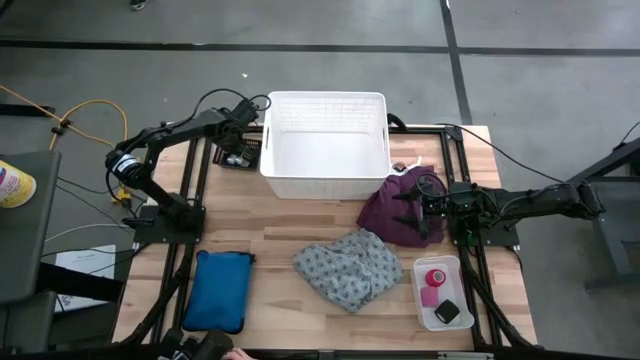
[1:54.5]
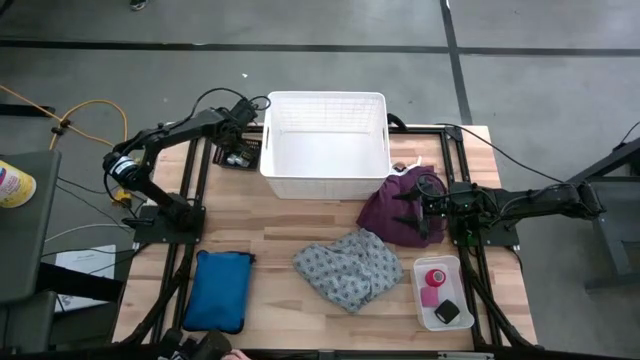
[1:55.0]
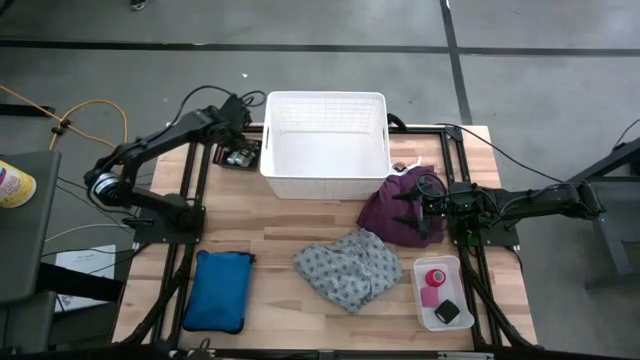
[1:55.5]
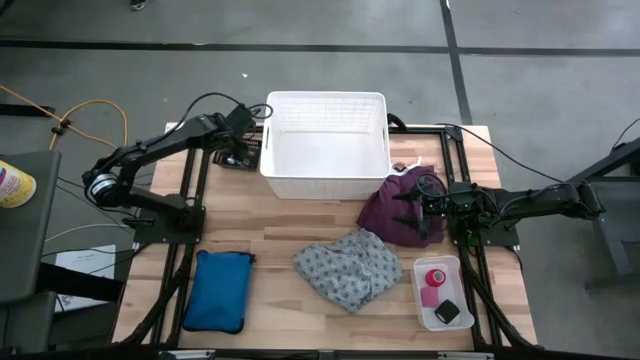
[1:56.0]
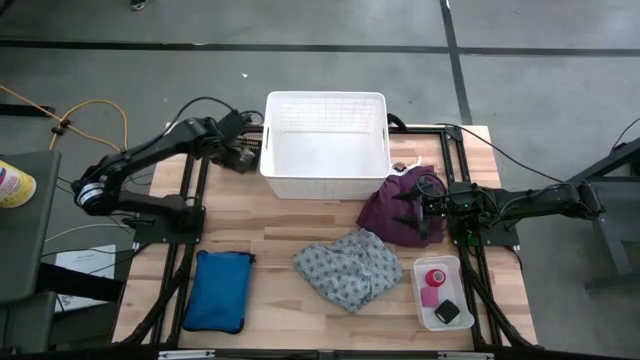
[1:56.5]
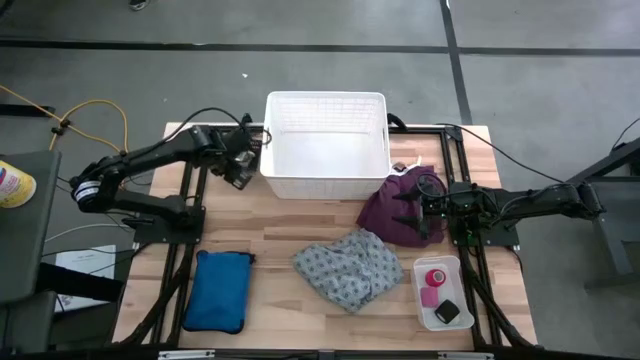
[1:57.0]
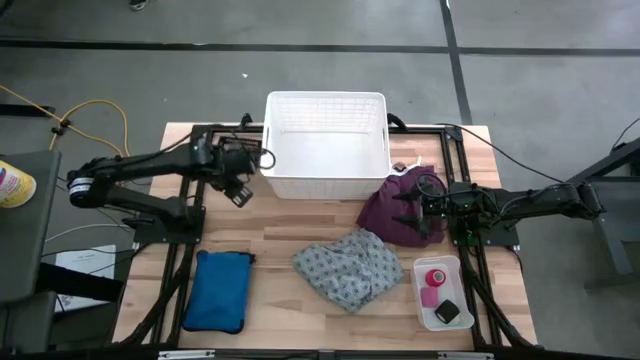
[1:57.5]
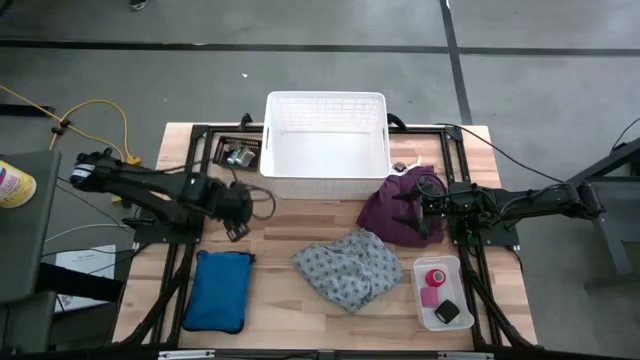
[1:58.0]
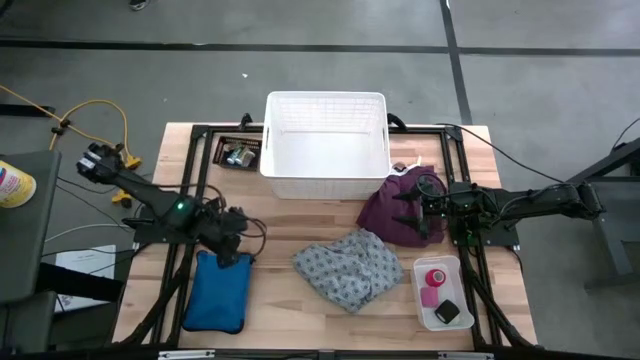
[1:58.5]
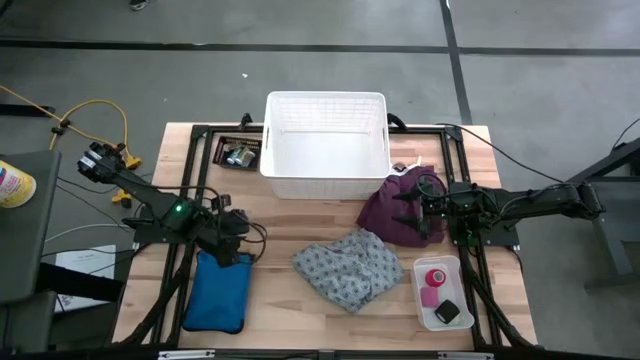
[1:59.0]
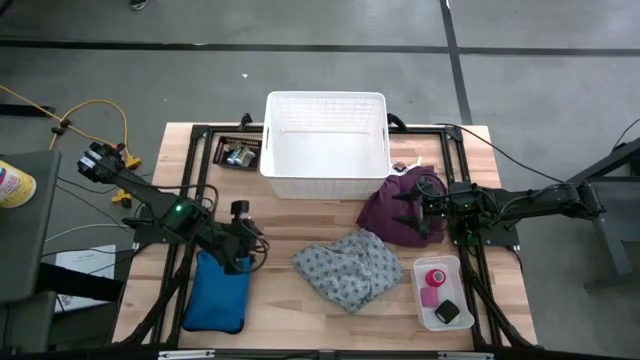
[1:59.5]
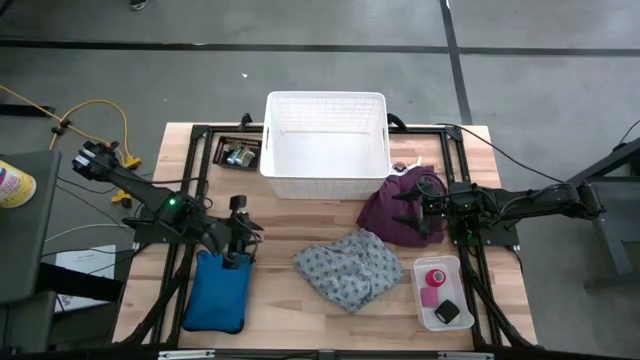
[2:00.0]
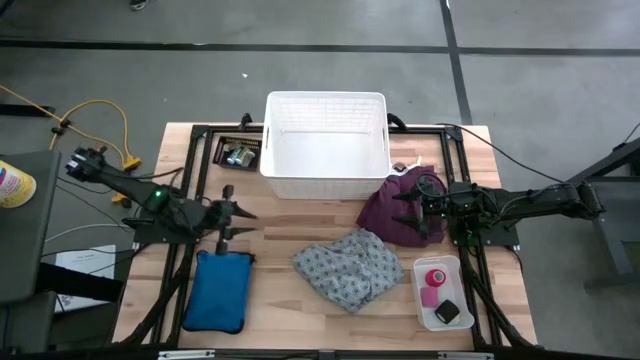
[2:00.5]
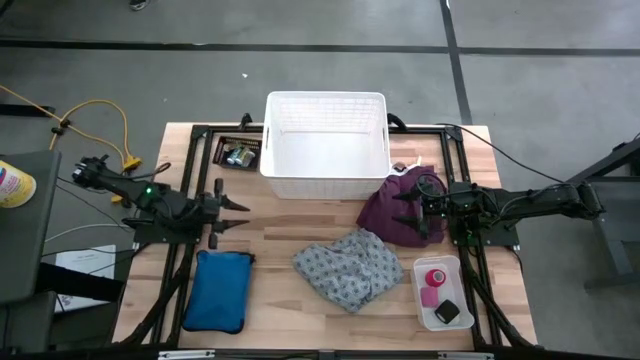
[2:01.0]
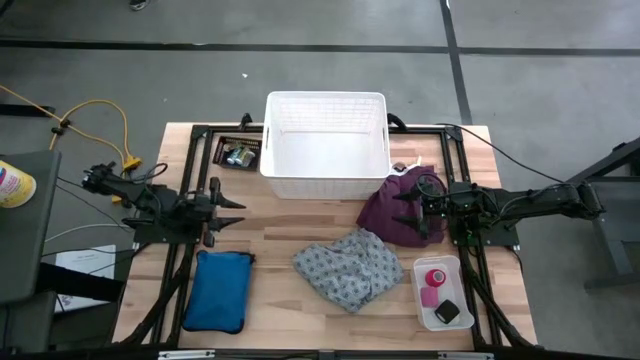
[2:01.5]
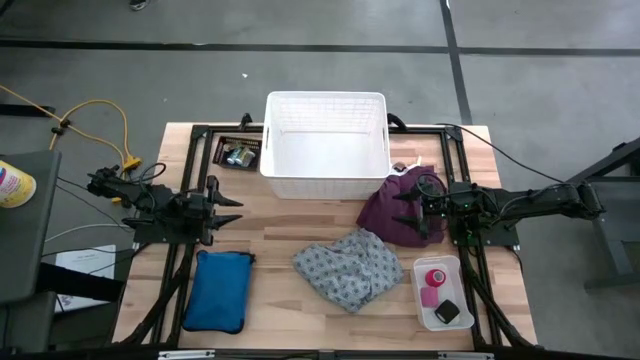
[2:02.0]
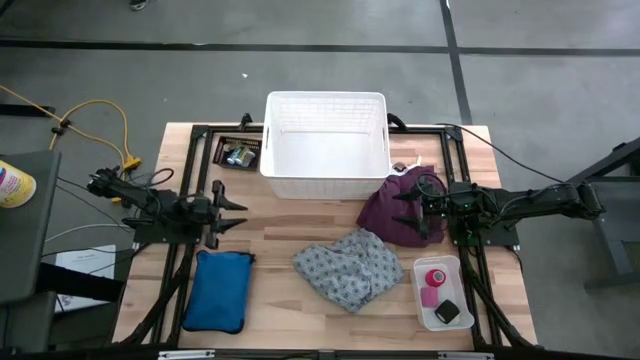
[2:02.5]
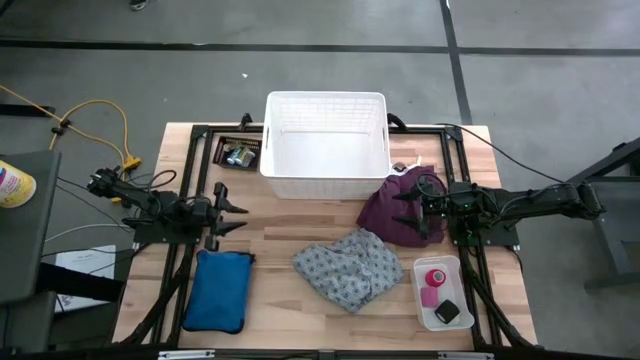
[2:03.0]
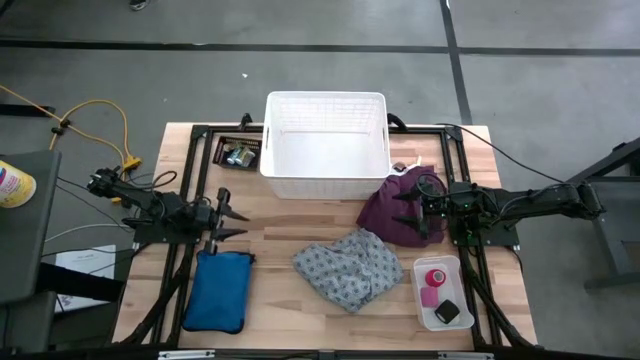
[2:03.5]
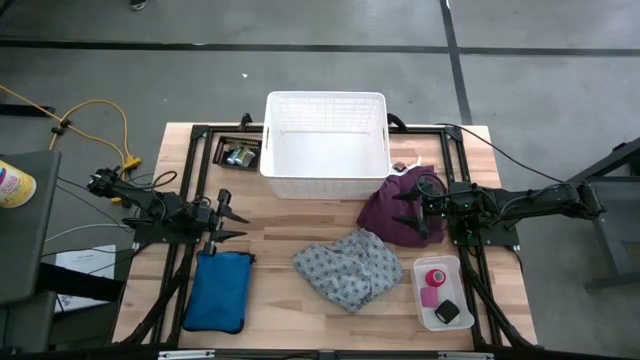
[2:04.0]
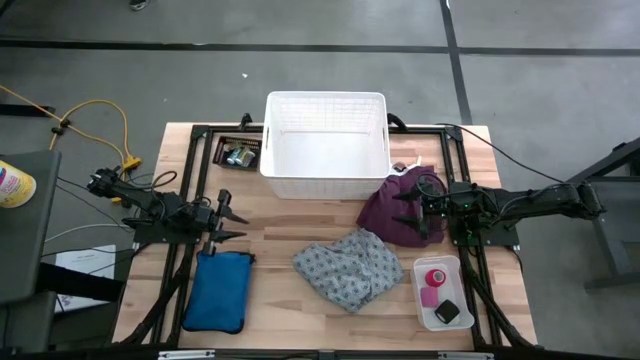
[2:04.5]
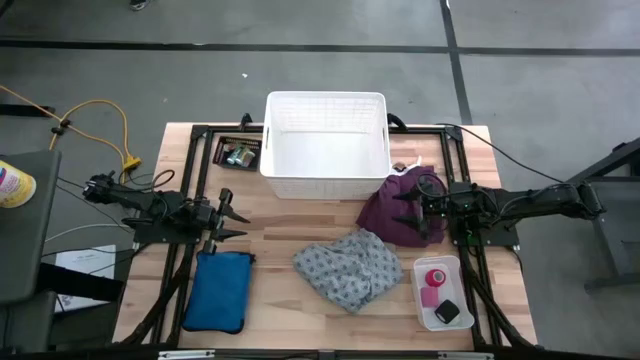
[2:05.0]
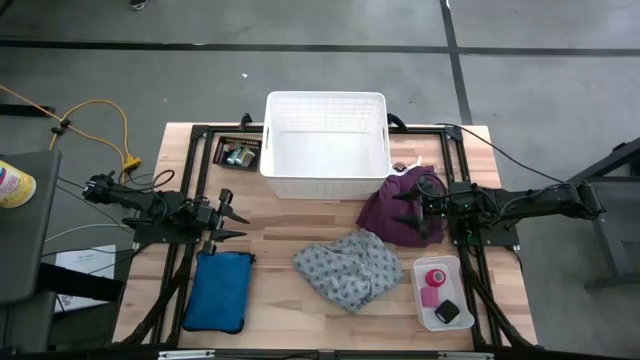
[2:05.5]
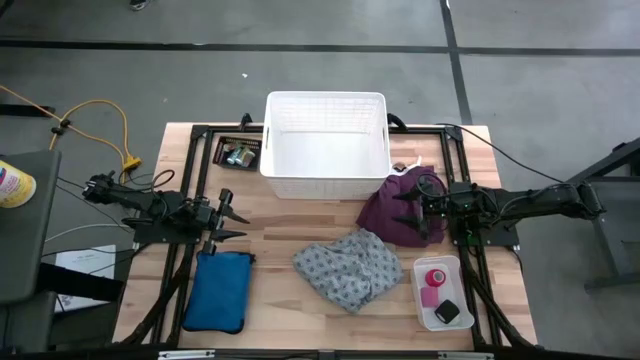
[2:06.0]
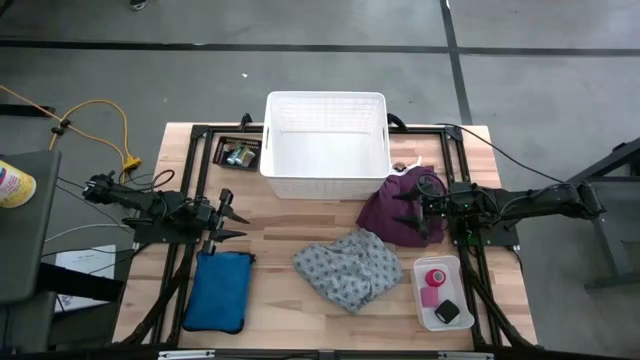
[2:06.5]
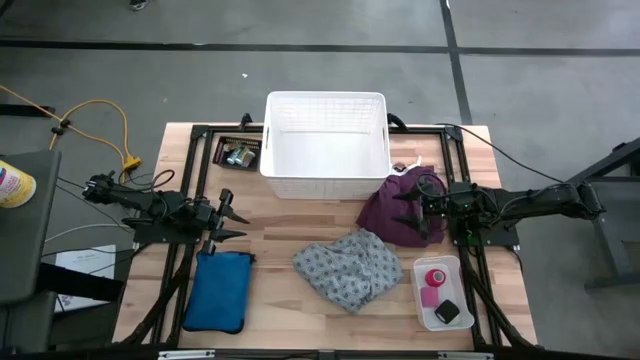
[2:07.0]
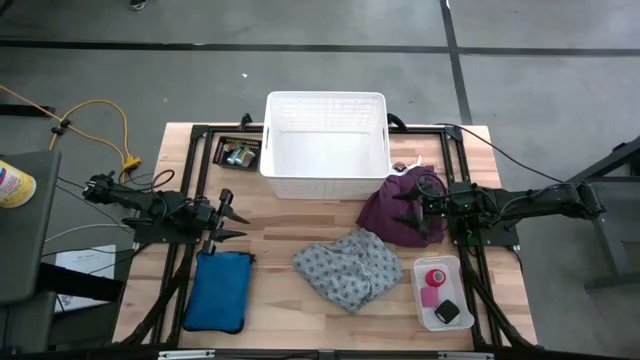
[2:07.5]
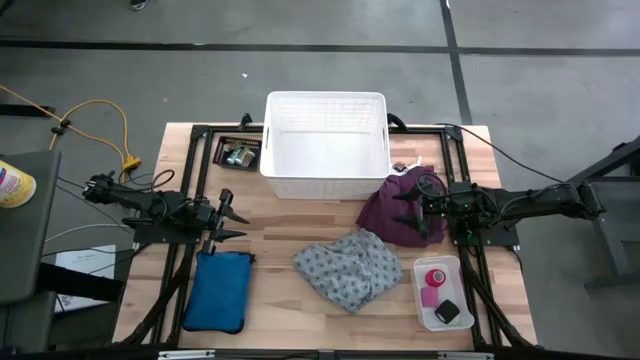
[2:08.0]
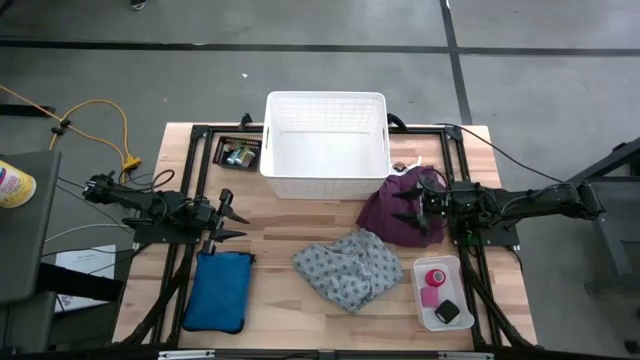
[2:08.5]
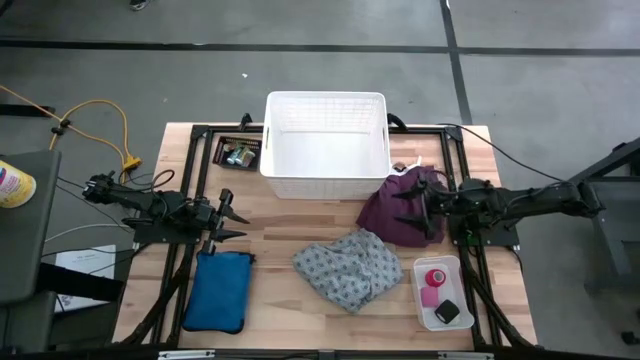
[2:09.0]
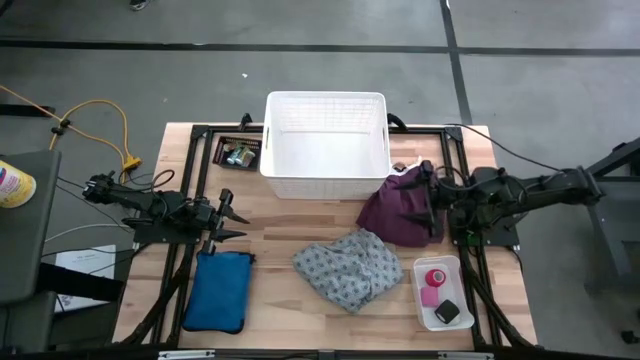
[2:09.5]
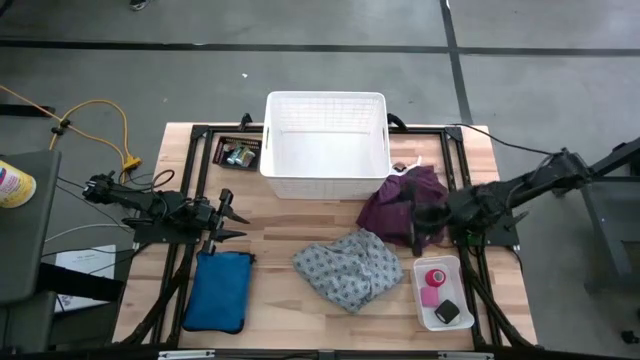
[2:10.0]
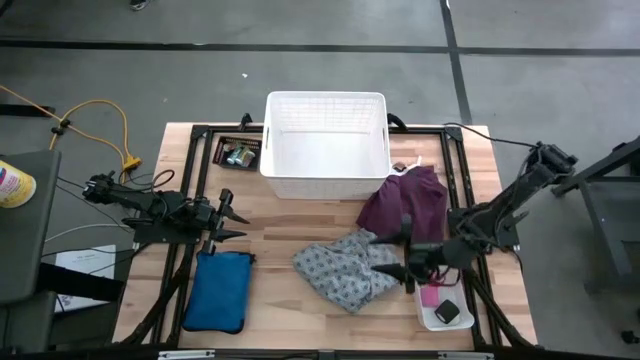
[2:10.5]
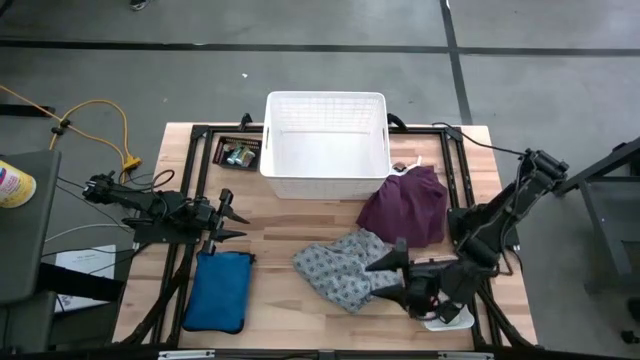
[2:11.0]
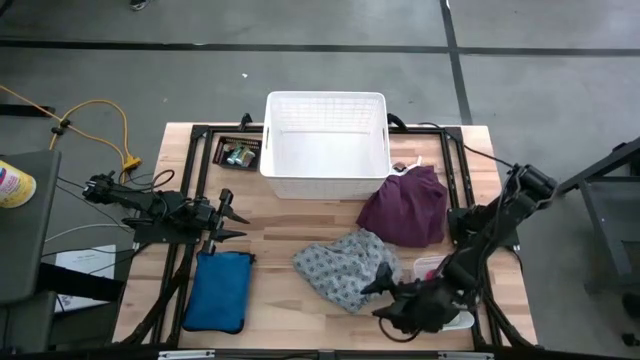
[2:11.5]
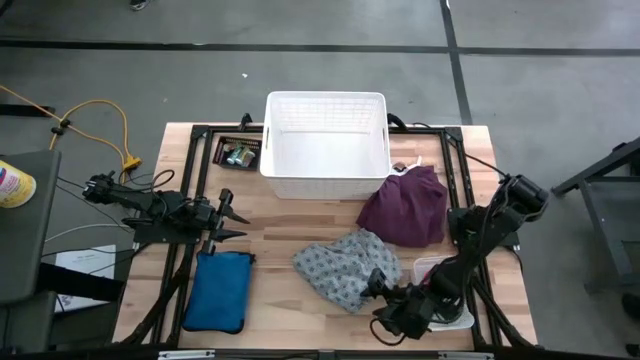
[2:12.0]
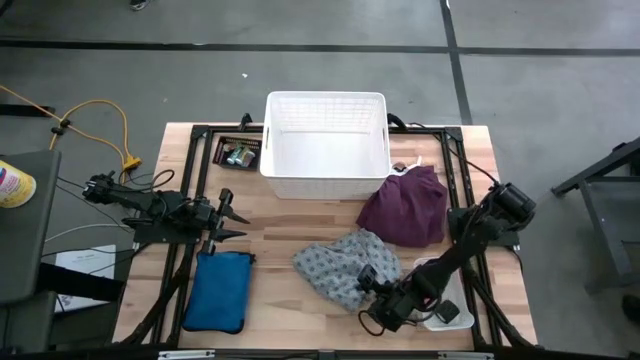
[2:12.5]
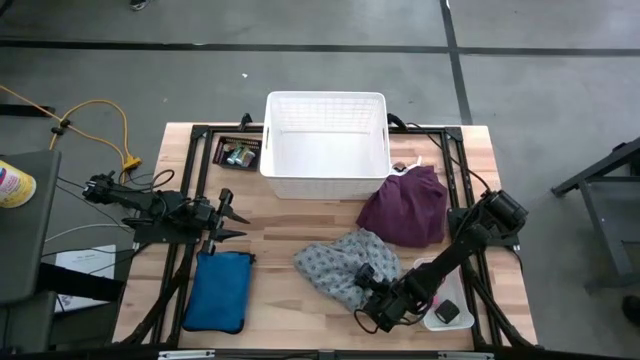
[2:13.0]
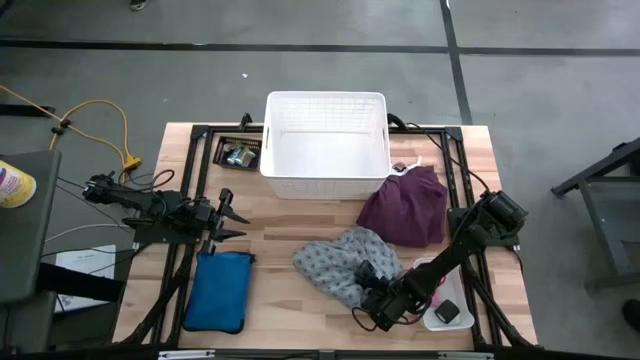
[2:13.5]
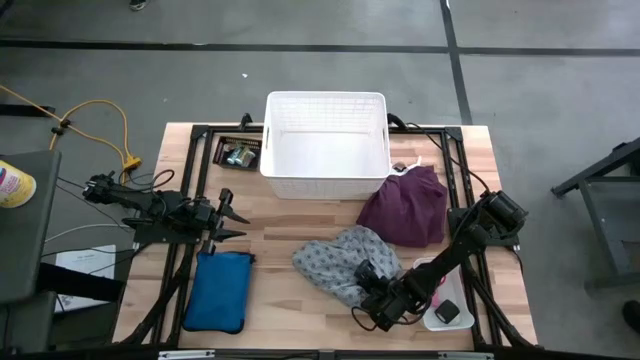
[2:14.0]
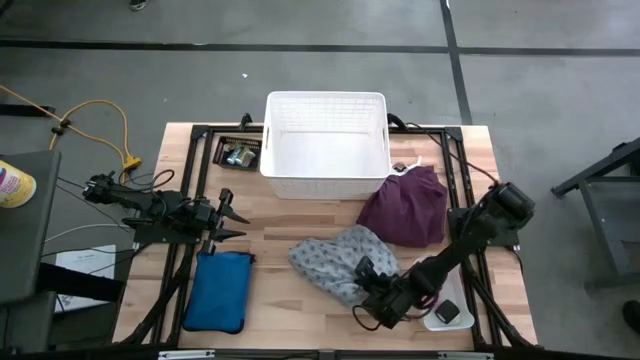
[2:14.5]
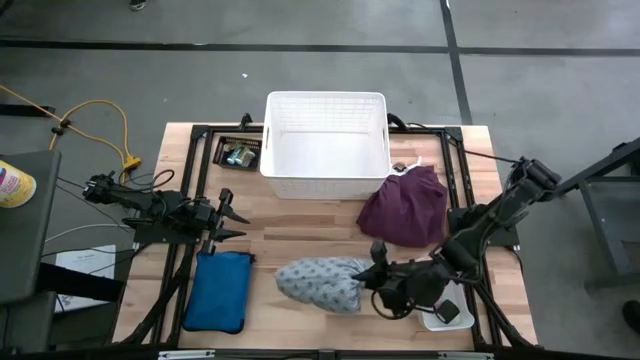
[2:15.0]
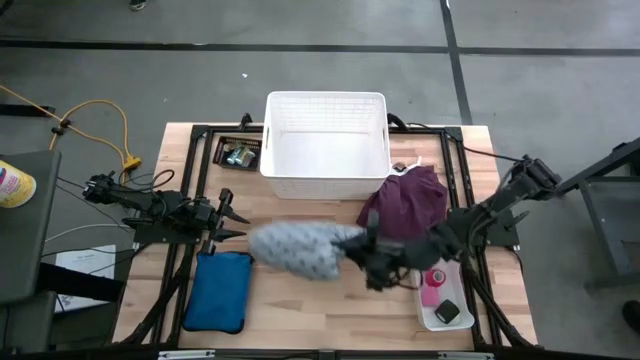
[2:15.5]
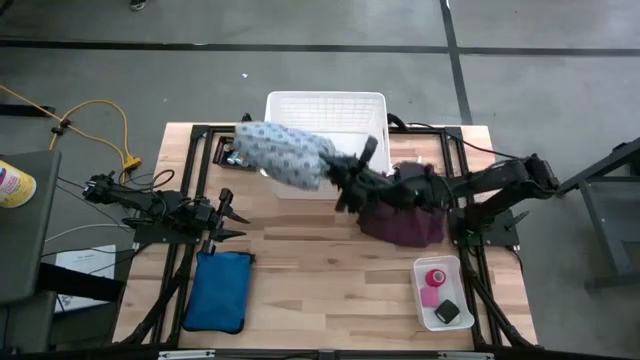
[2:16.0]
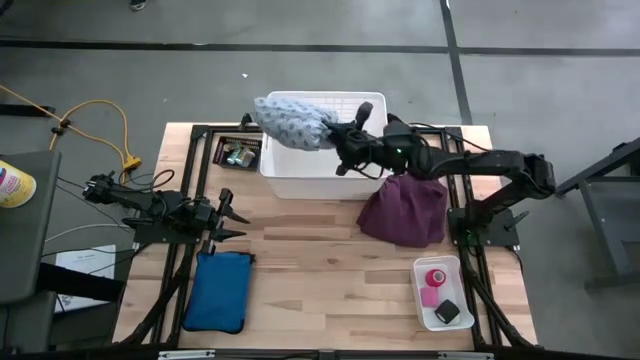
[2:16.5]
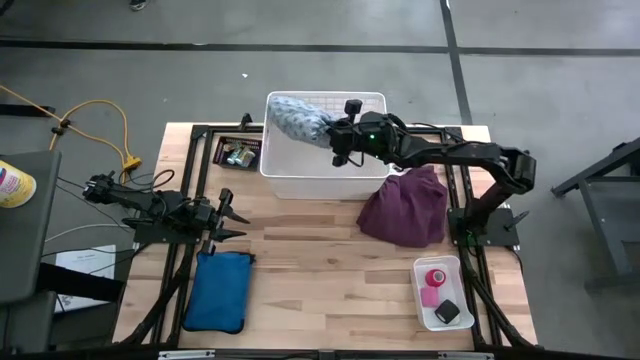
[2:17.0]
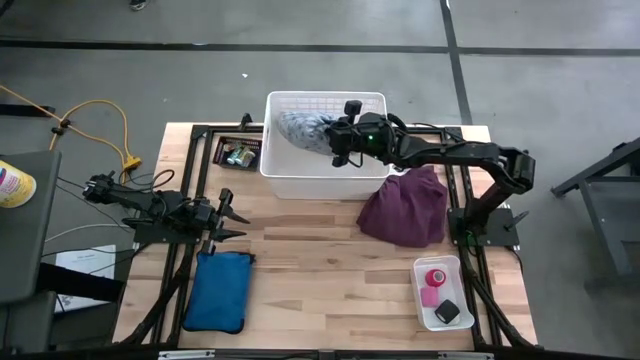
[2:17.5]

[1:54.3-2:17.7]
Task: Pick & place medical supplies in basket/bin
Put the light blue patient gown into the large white bin
